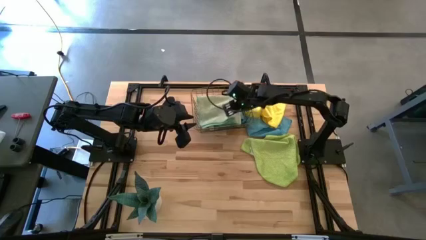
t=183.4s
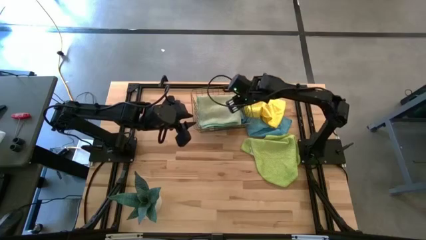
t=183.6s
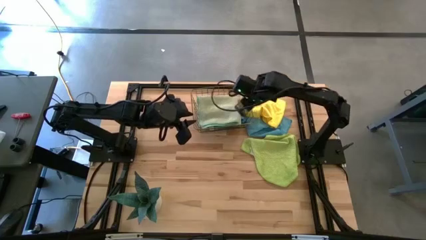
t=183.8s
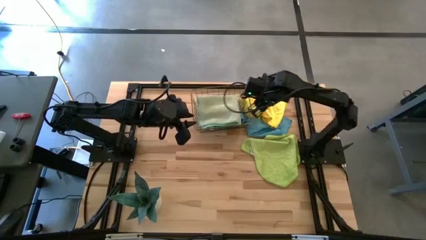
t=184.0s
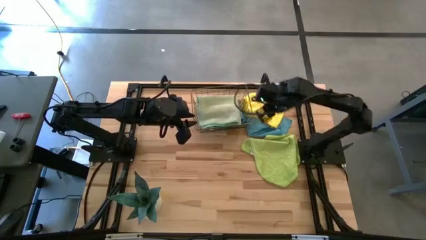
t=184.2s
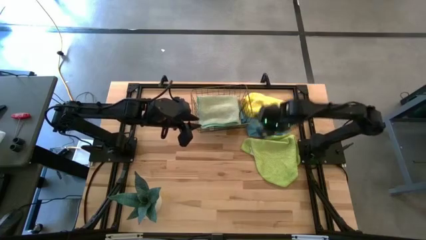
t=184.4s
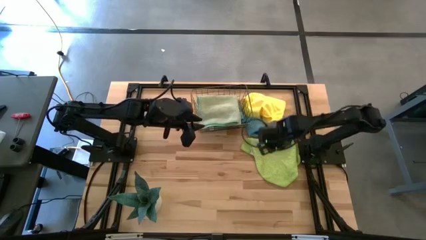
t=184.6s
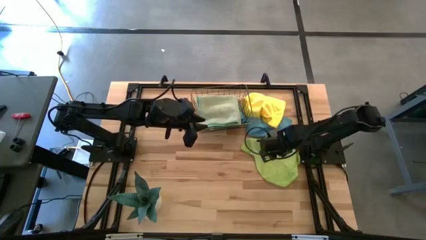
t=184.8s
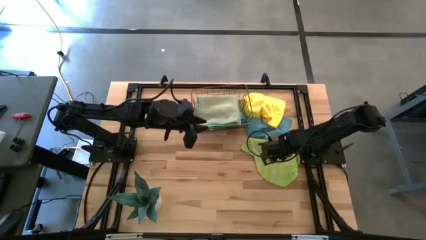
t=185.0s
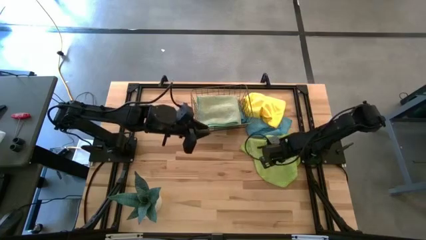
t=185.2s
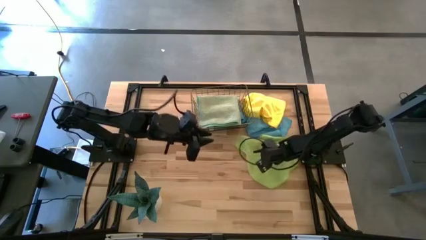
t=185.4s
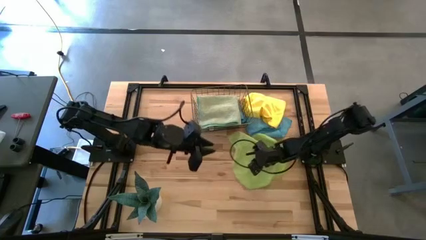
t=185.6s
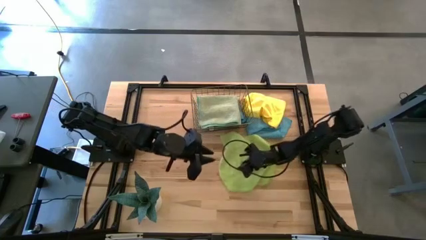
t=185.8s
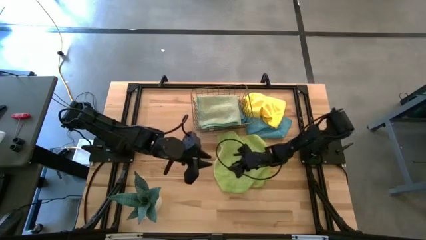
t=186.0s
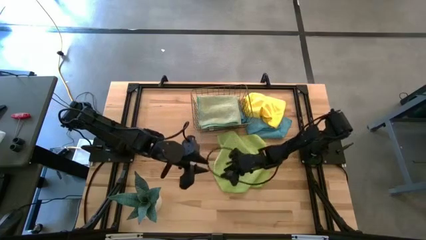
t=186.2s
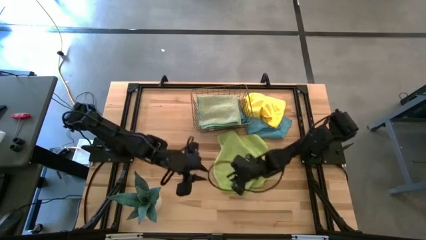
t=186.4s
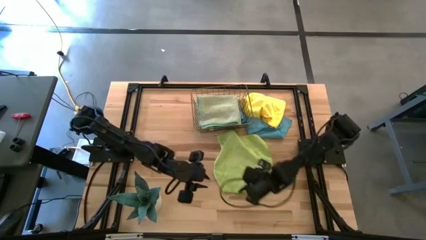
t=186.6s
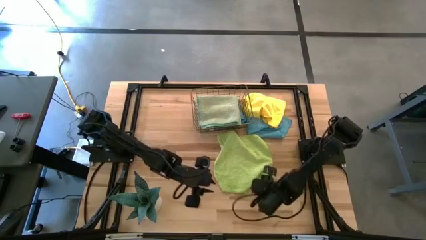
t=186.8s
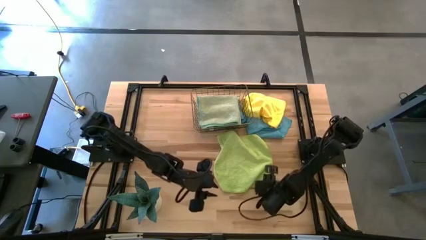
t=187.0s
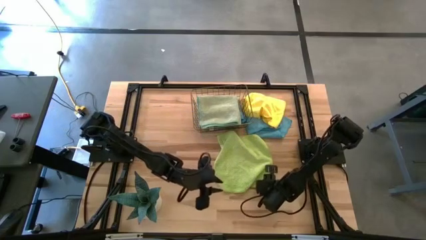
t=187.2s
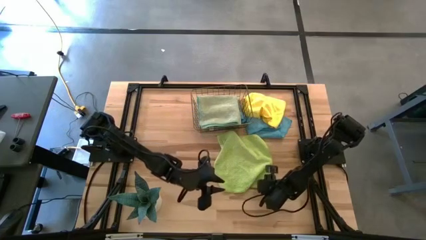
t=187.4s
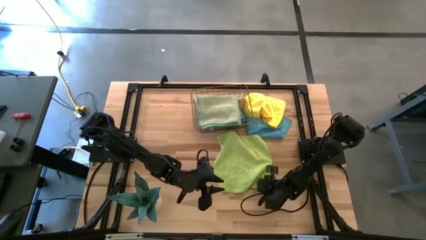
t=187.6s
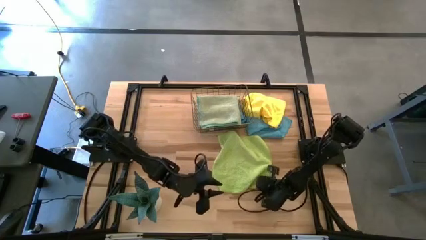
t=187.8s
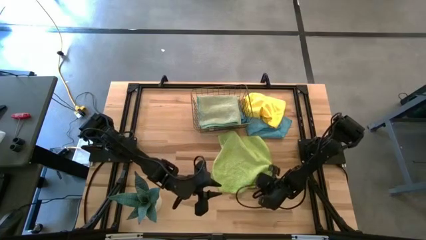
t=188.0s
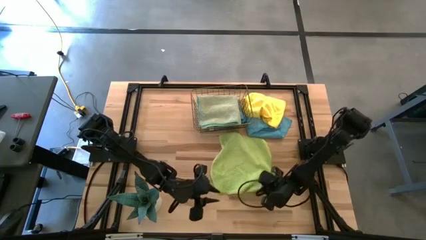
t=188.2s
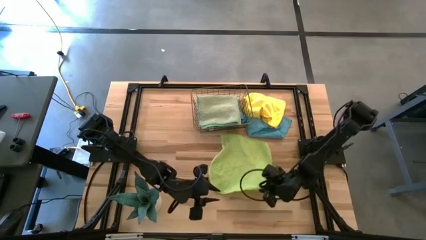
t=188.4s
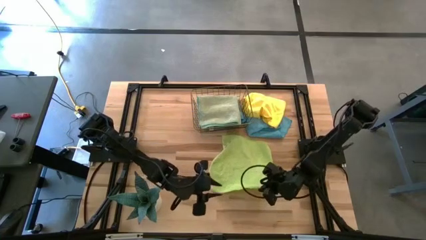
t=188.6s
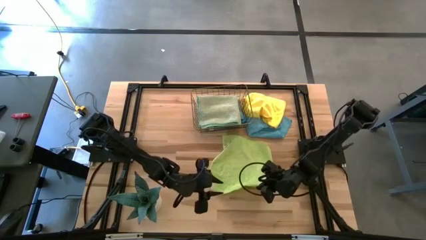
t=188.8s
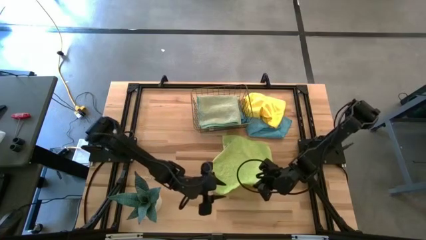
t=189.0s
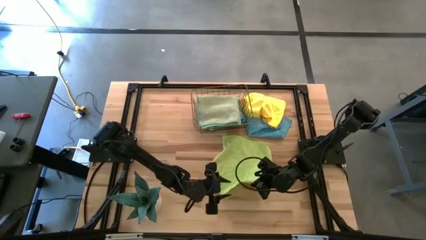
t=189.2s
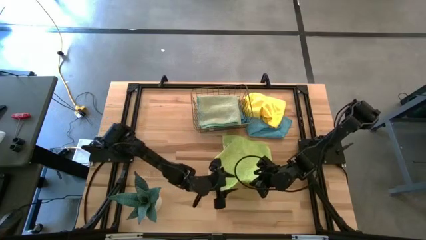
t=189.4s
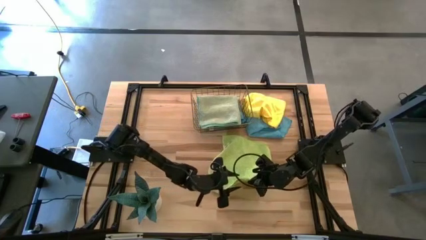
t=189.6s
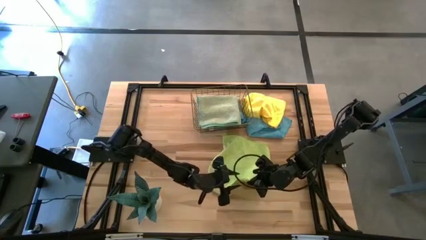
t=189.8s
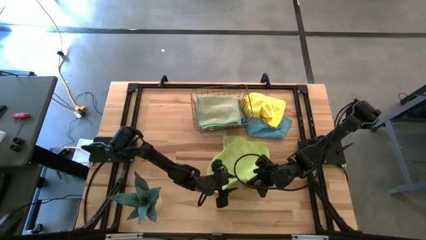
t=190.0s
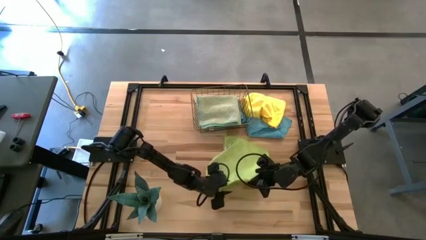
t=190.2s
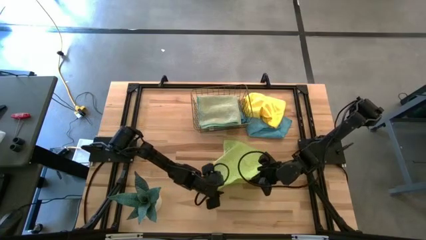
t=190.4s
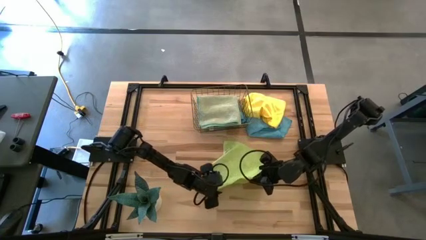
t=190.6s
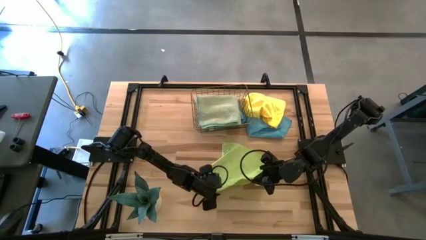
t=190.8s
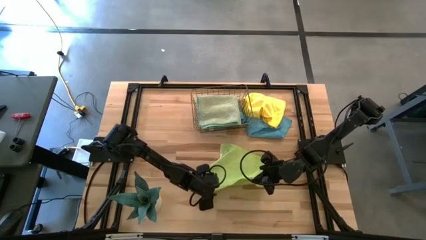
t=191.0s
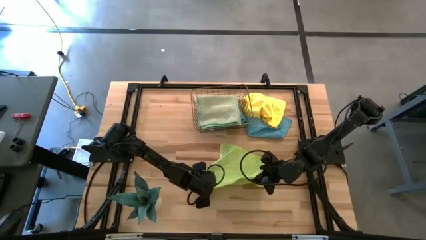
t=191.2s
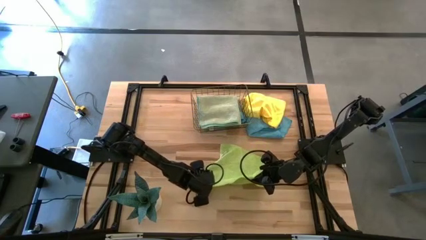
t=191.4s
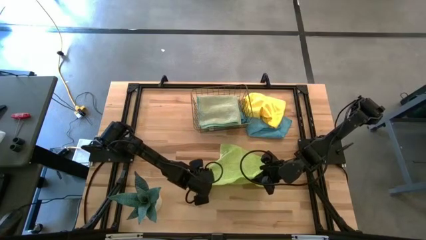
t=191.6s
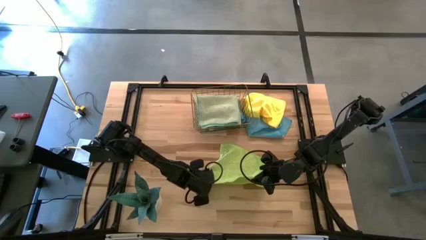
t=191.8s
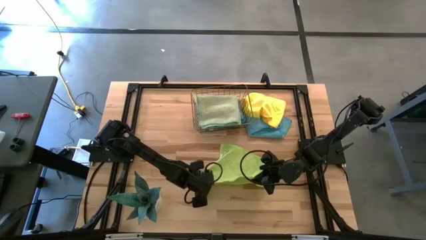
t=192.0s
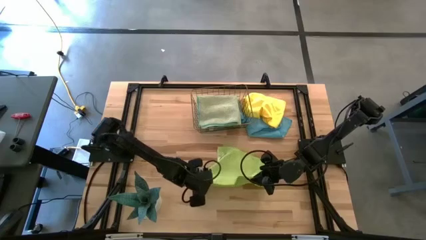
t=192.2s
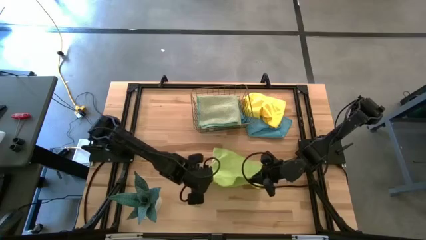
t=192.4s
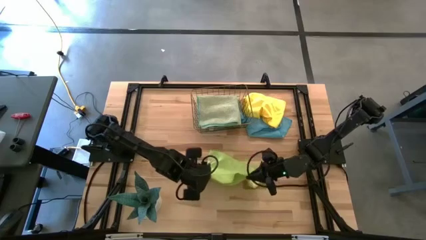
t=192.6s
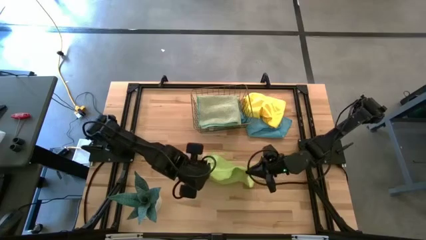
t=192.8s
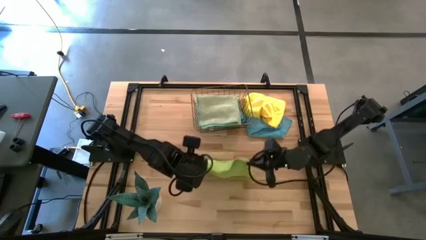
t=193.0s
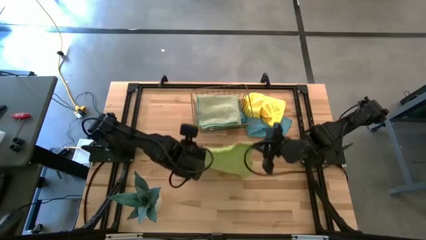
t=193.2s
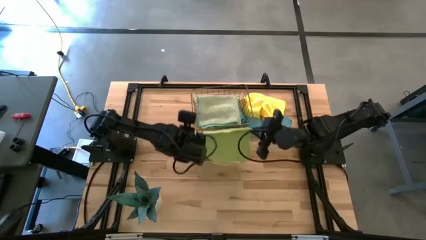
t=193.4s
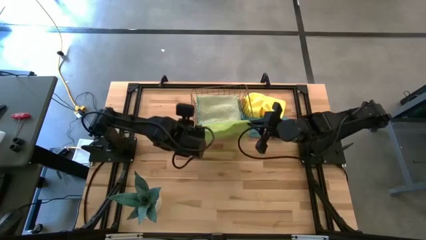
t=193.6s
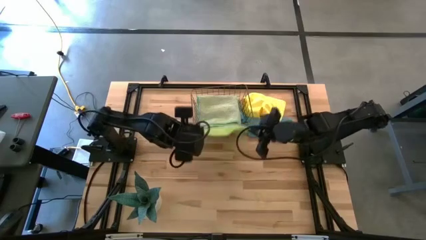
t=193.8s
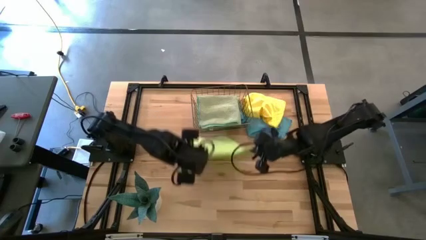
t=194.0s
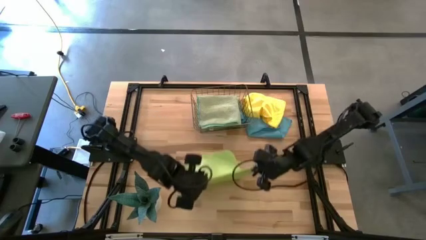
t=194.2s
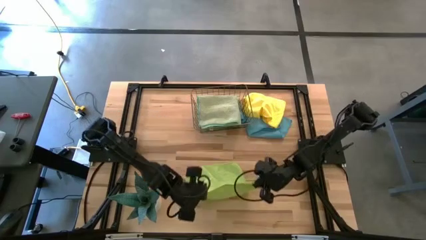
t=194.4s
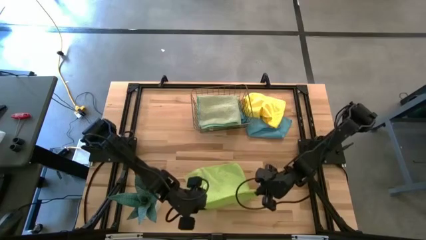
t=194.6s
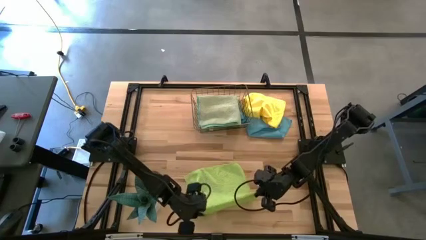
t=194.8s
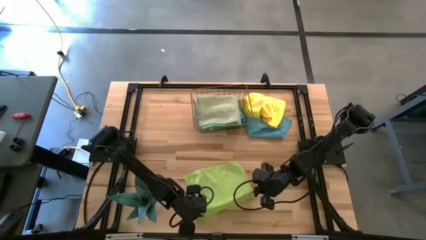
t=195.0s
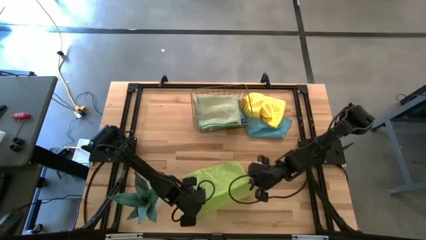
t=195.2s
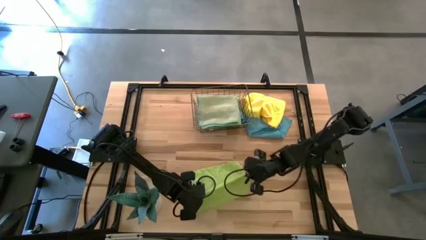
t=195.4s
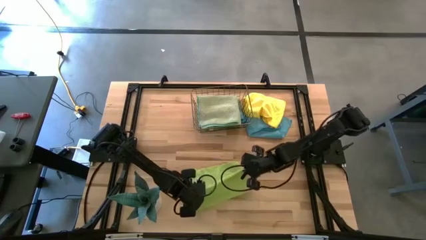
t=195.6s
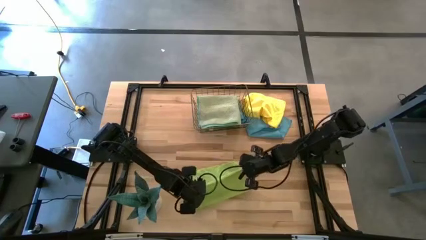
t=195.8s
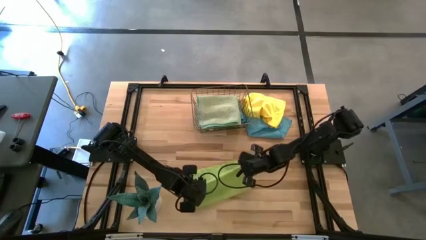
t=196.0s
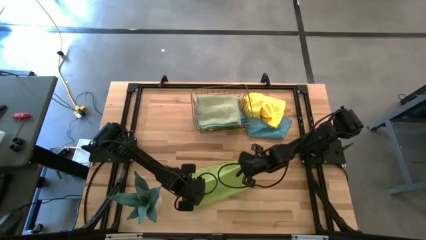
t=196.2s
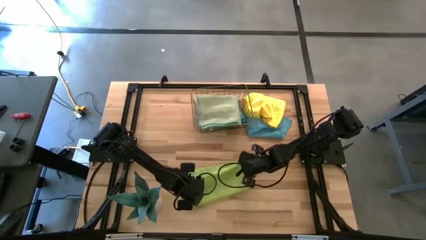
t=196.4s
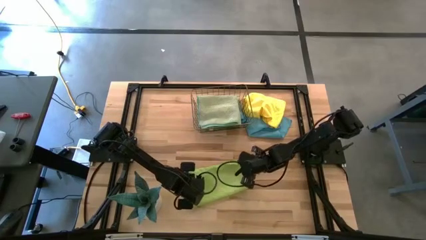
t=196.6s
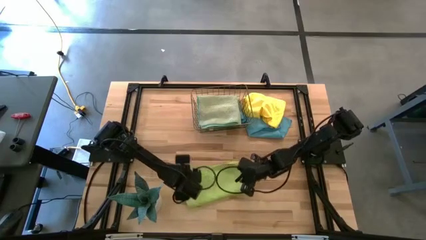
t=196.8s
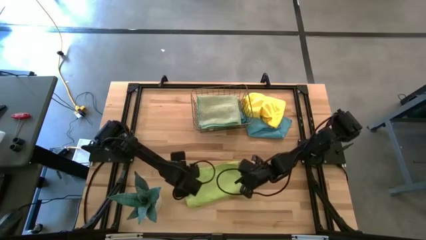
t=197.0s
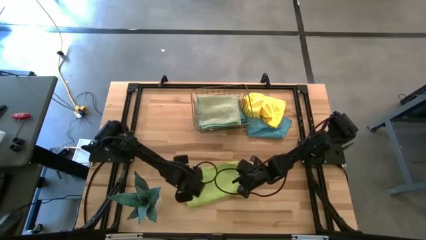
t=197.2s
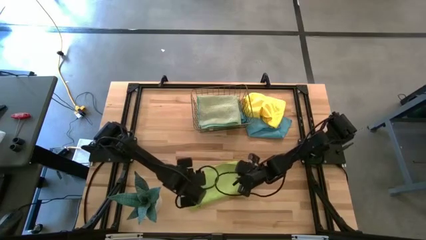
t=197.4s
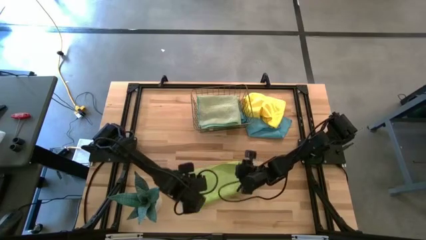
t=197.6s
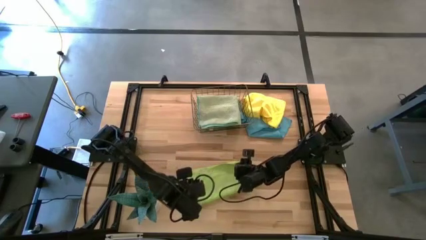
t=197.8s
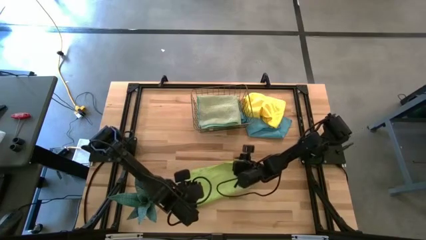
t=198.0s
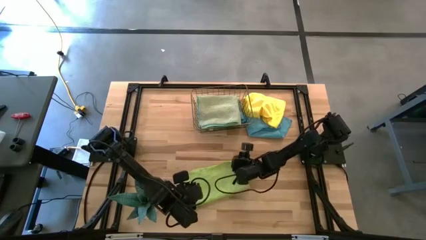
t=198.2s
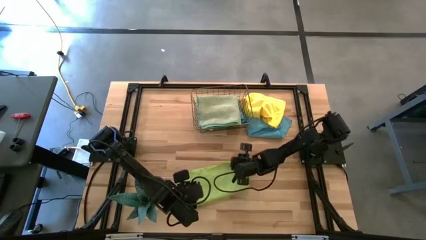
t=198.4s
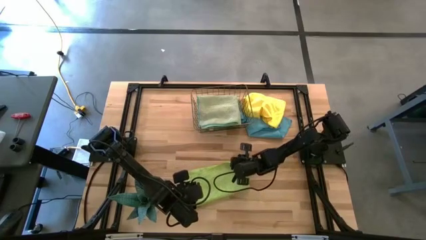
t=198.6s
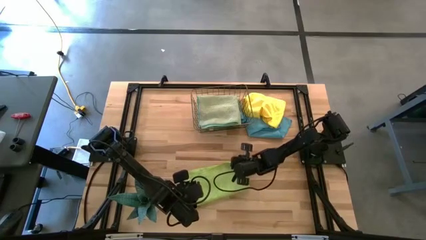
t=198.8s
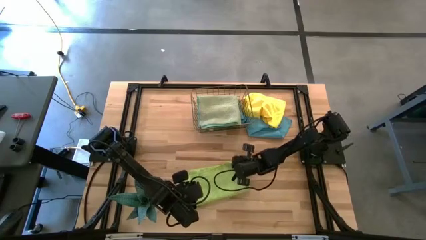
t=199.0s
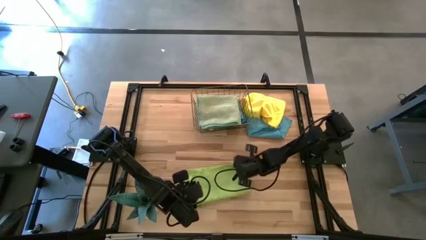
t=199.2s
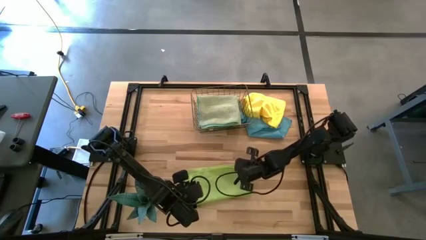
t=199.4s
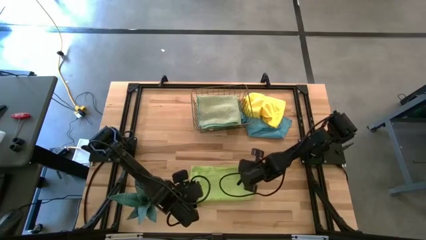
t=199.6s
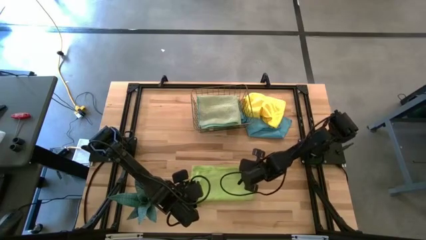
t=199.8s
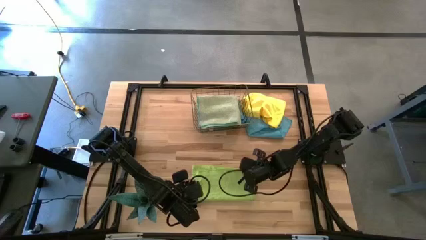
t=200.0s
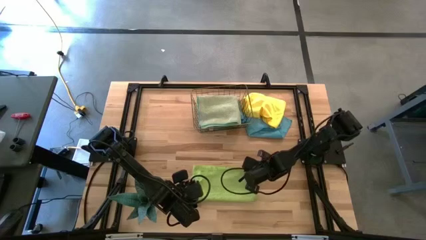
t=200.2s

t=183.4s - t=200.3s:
Task: Fold microfiber towels
Fold the green towel
